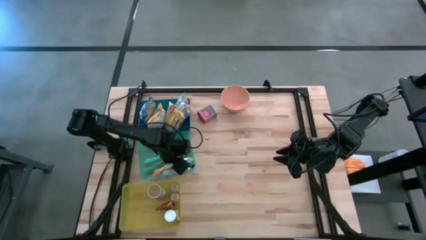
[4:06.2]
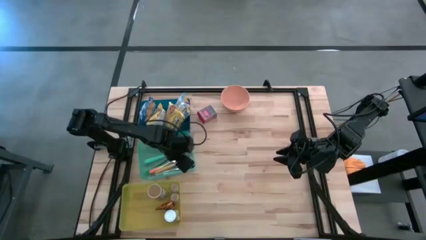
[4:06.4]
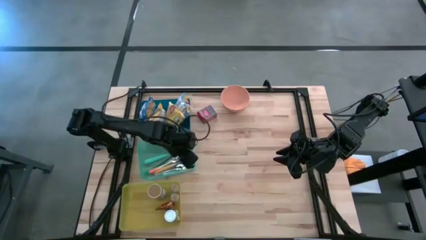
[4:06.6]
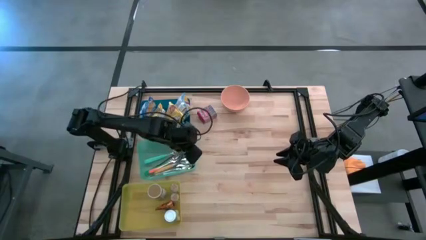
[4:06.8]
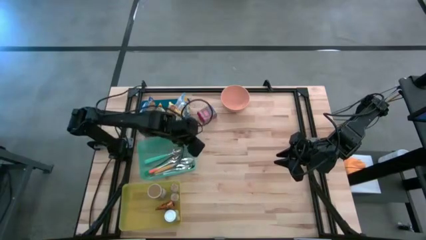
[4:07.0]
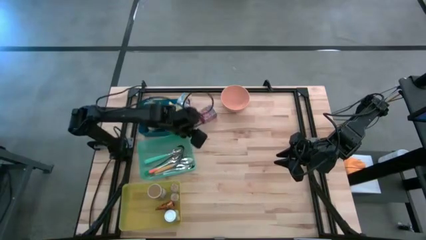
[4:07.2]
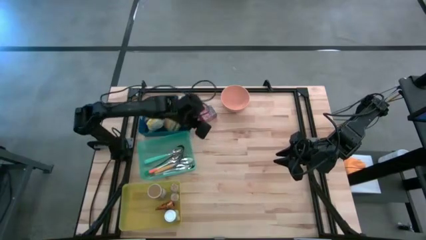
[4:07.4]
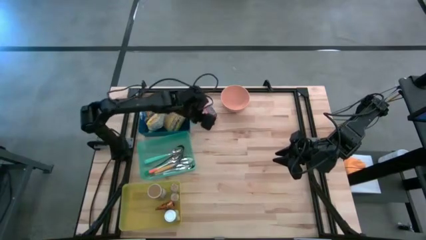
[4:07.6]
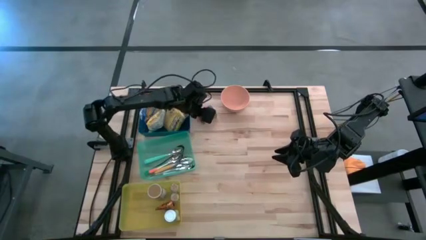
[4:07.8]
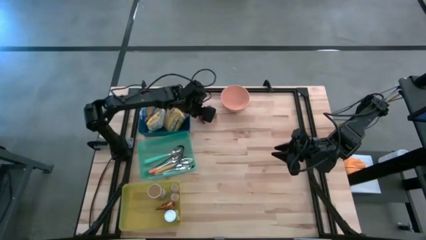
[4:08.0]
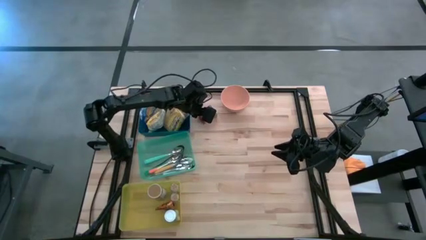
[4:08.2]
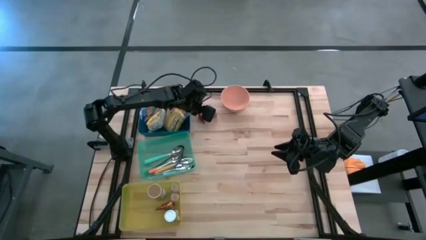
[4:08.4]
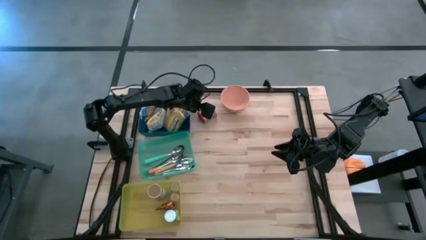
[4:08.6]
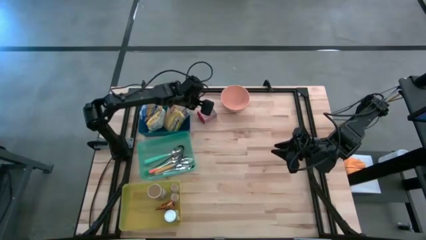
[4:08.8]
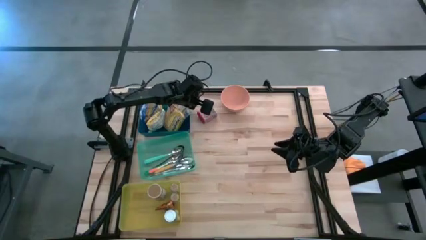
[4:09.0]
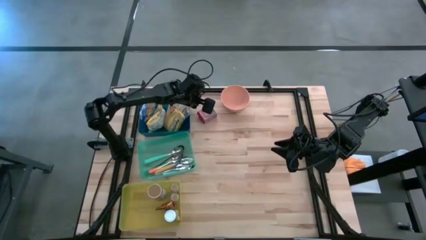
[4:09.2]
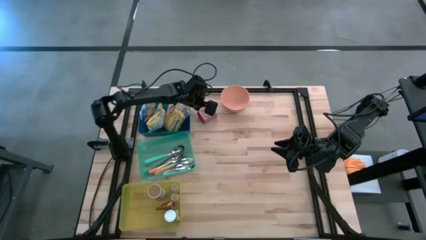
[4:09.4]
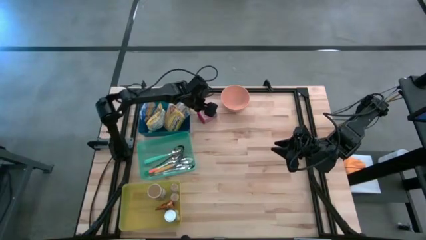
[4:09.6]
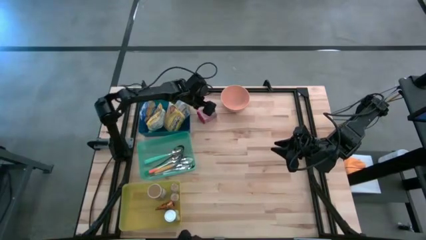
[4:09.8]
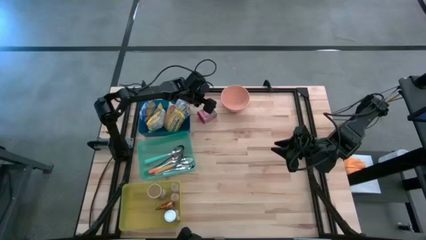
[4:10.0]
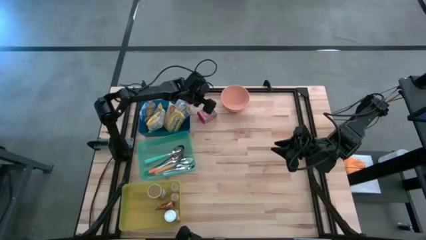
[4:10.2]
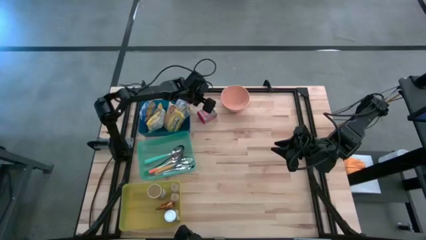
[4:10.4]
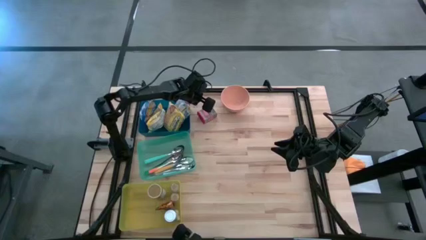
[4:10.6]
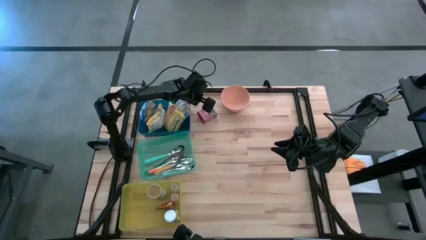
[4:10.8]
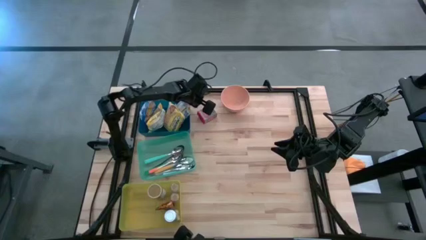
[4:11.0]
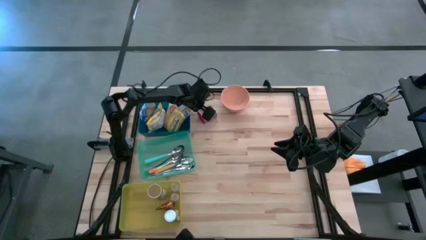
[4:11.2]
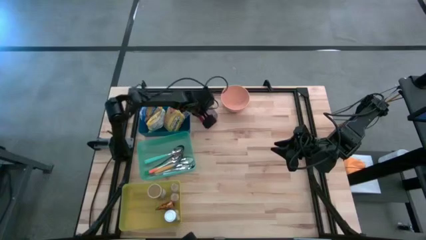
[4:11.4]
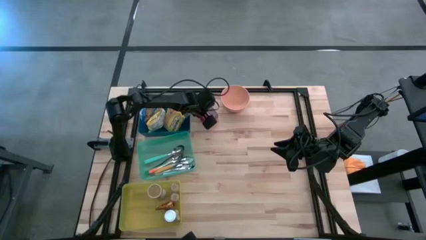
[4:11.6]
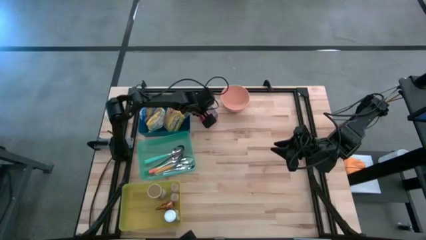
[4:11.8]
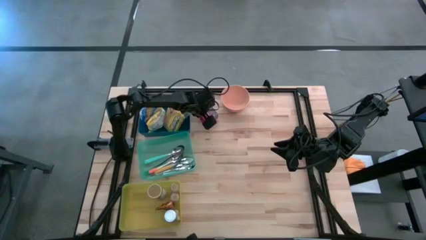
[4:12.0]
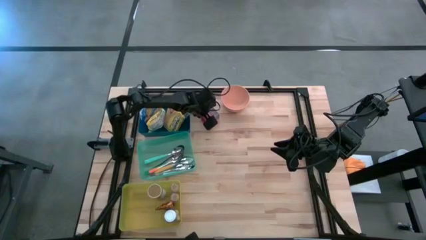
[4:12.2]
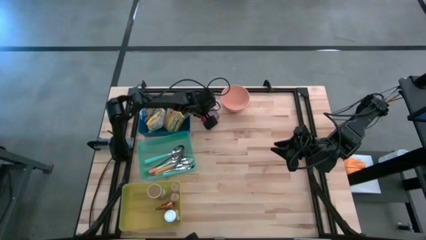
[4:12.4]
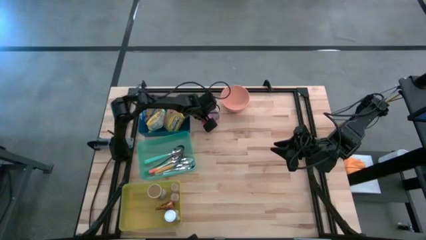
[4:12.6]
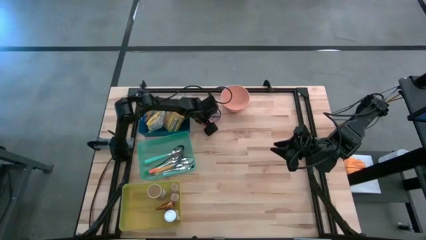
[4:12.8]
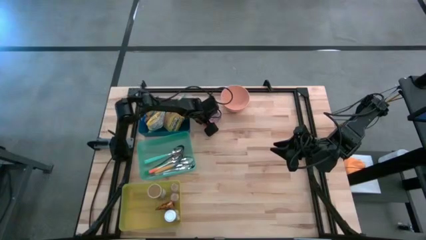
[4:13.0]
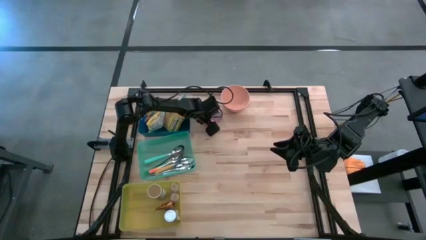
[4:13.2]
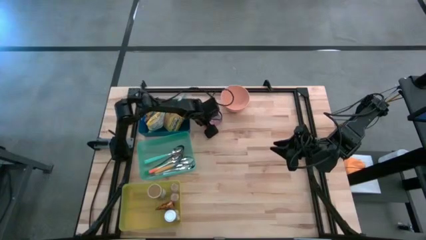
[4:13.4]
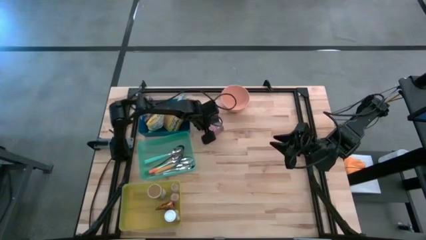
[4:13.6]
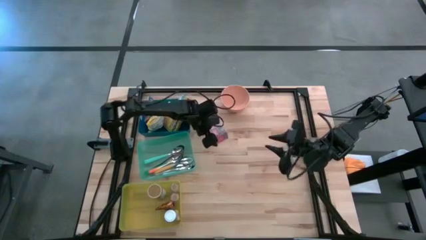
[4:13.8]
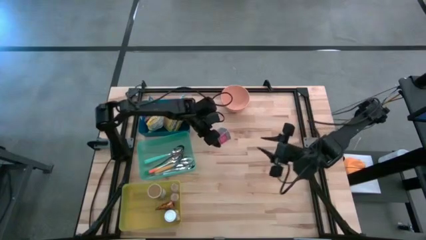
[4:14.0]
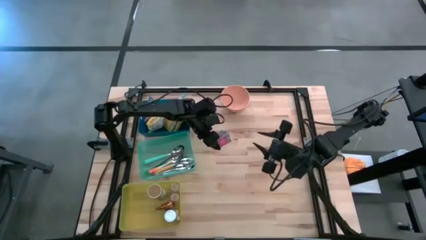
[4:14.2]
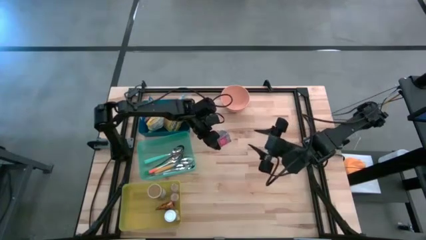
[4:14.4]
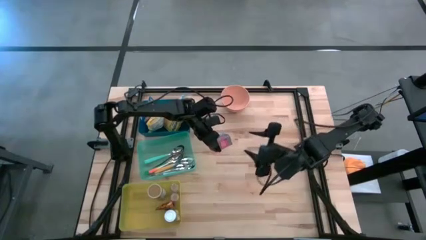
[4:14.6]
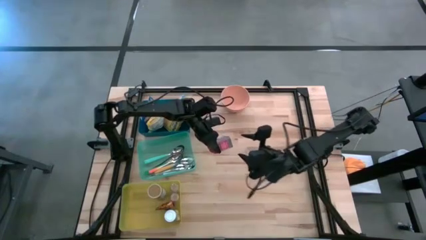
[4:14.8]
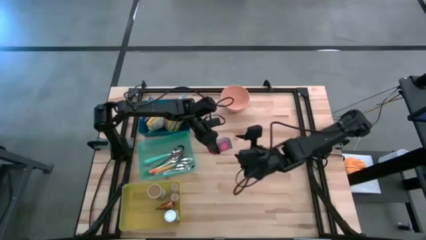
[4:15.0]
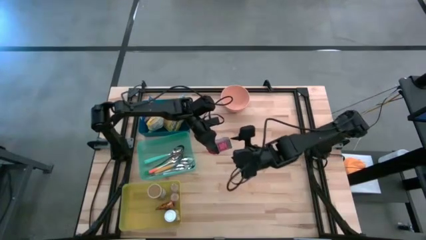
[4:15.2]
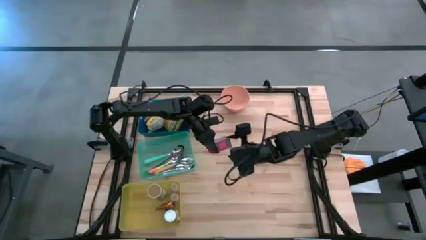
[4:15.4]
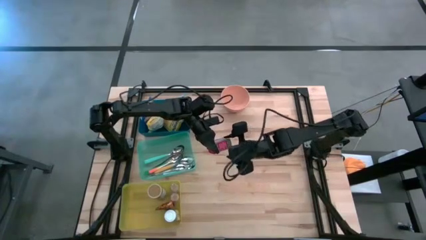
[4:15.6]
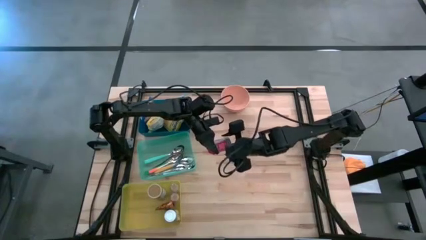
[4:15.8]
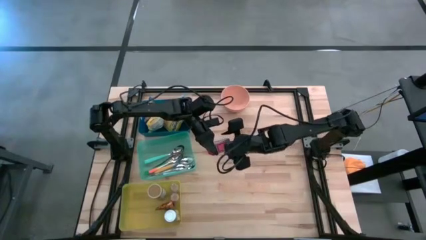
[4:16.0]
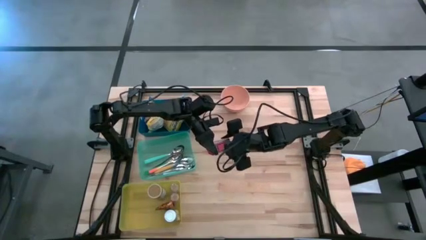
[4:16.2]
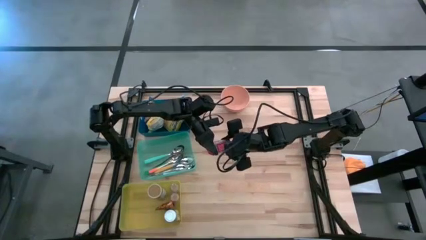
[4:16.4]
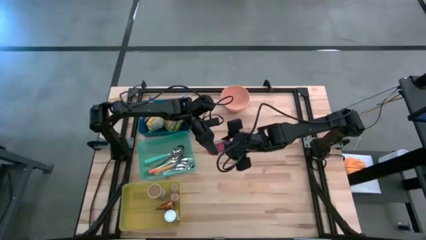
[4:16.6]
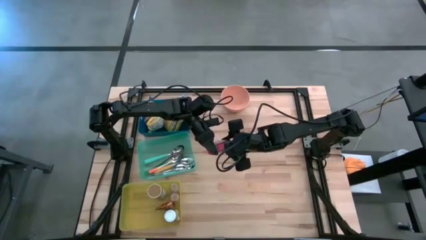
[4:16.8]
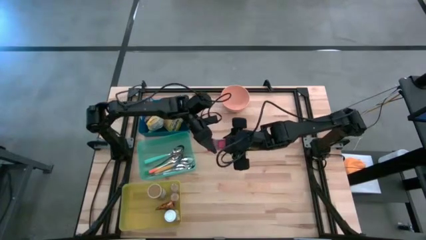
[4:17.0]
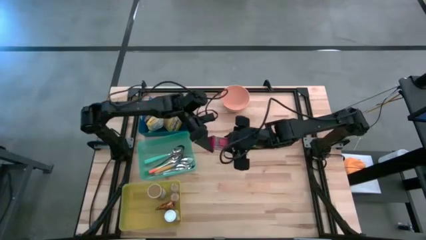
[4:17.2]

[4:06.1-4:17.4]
Put the red spice can into the yellow bin
